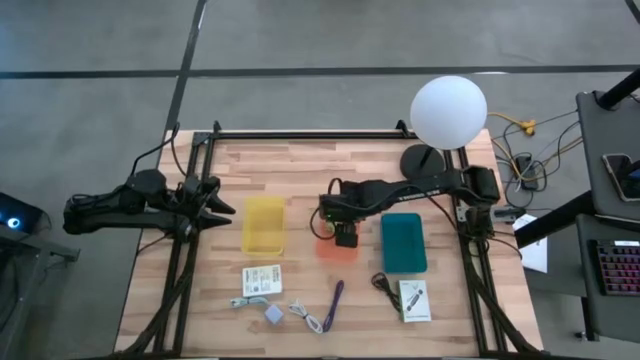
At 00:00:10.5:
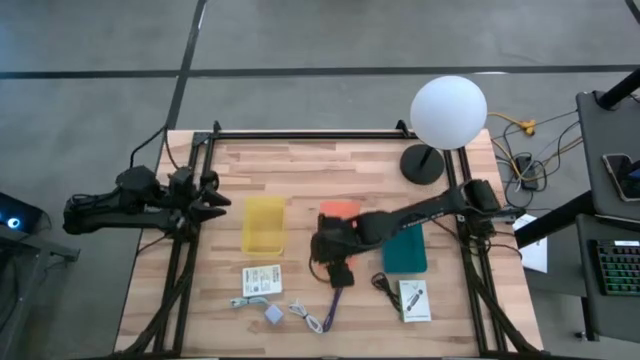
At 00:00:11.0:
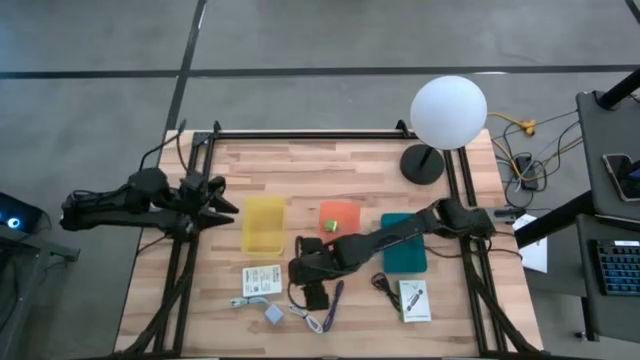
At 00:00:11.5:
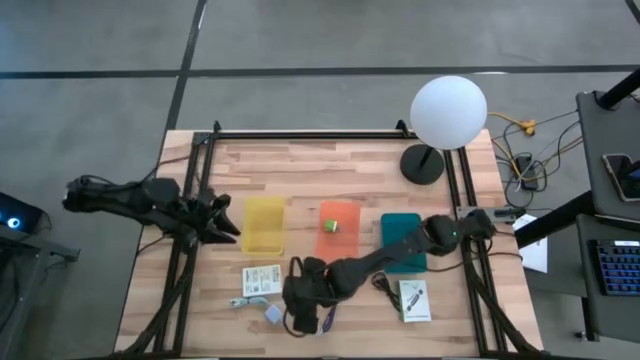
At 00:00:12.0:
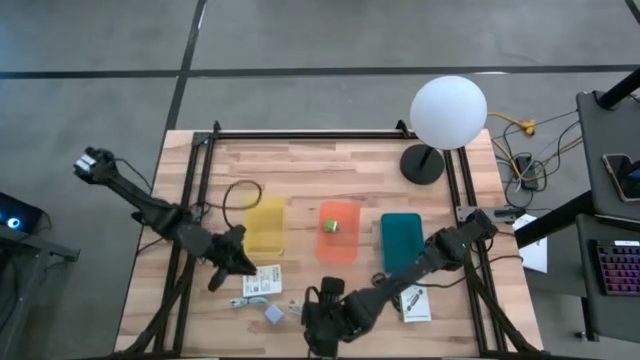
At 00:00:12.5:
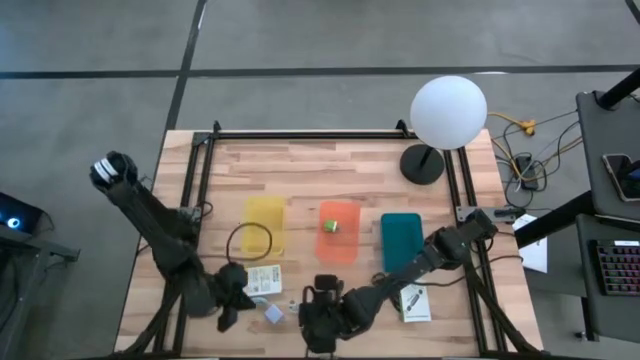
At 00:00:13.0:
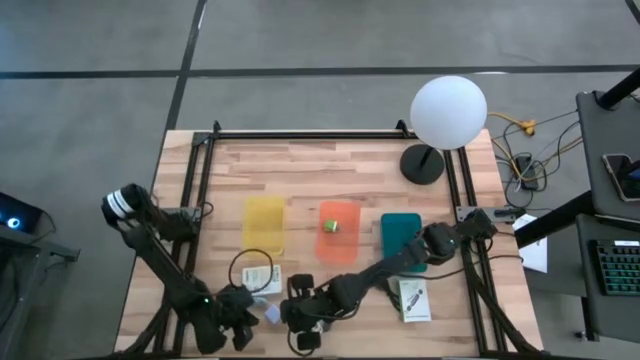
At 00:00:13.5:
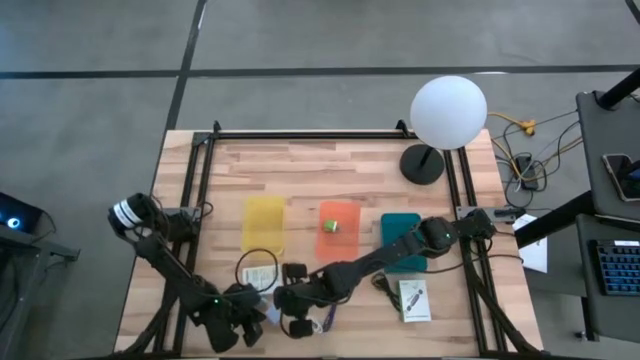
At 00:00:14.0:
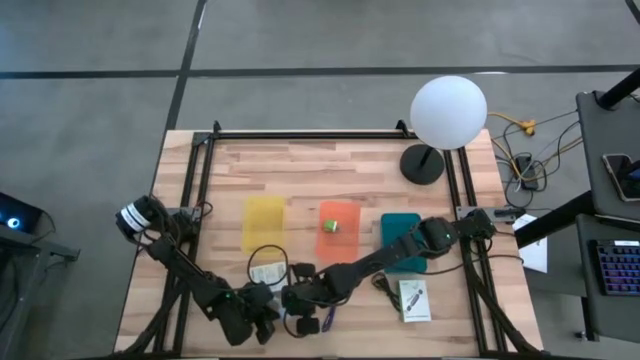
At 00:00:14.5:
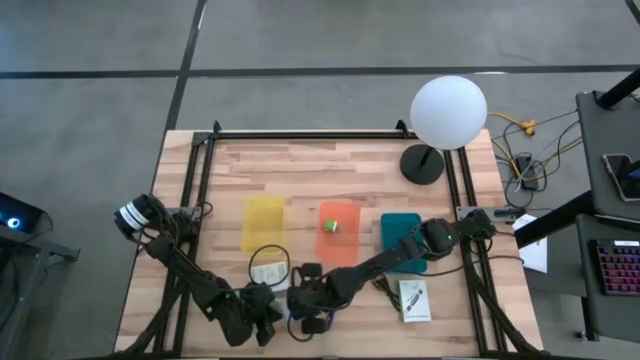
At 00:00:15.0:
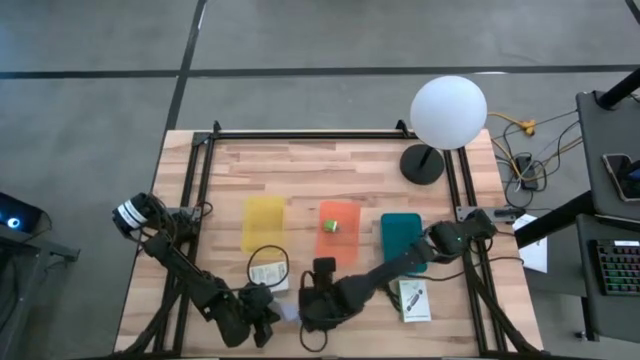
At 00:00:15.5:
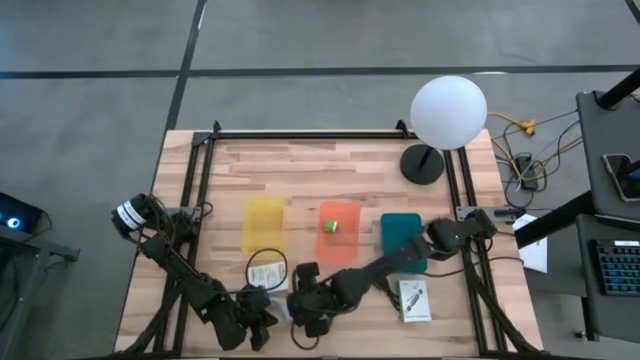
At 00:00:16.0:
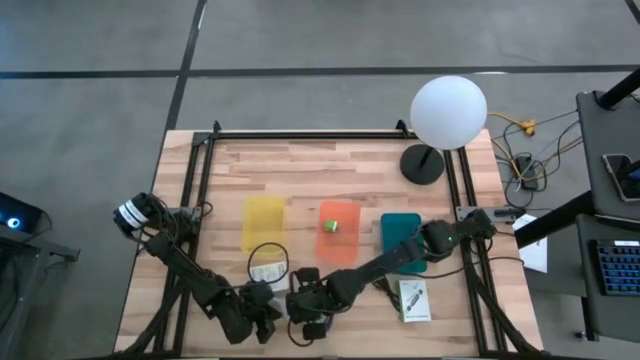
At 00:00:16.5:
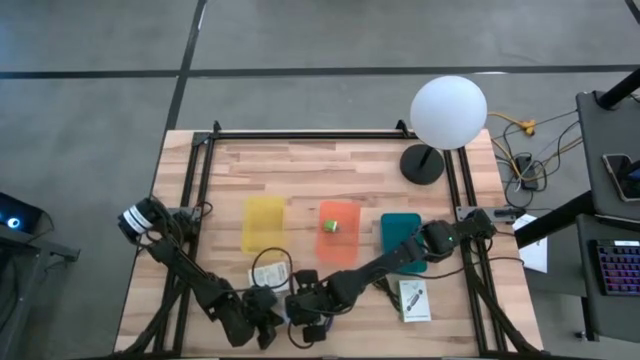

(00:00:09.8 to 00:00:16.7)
Task: Pick and place items into bin
Put the white charger adapter into the orange bin

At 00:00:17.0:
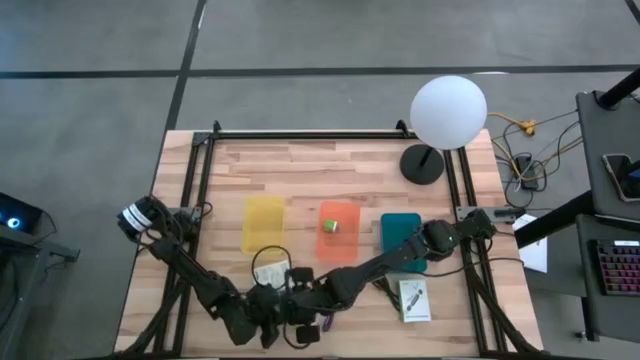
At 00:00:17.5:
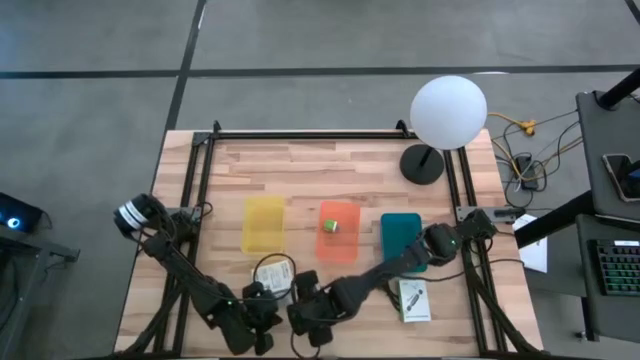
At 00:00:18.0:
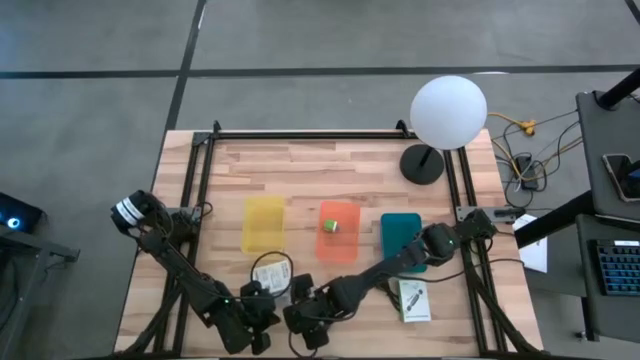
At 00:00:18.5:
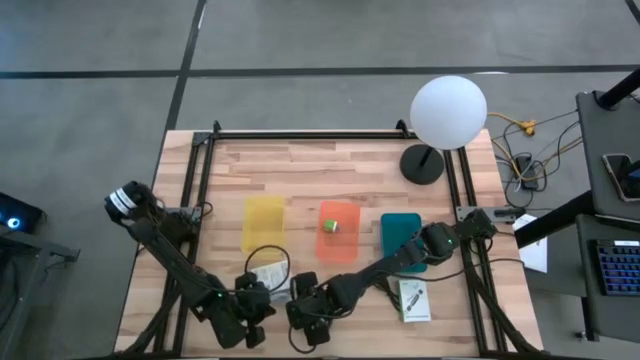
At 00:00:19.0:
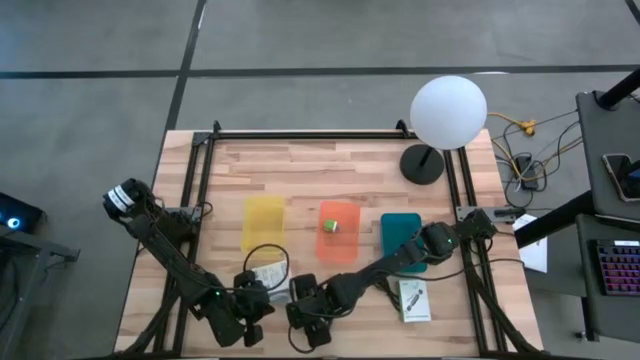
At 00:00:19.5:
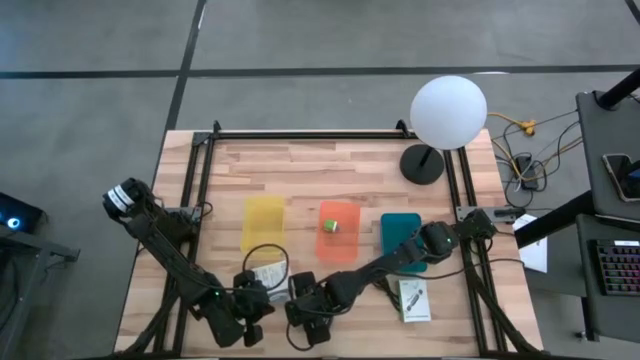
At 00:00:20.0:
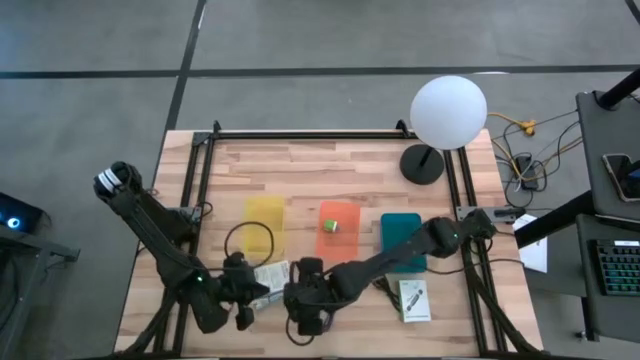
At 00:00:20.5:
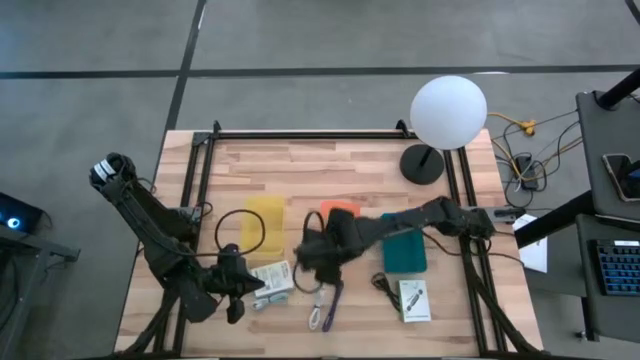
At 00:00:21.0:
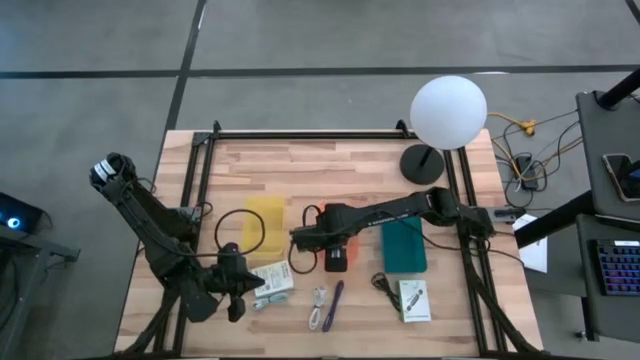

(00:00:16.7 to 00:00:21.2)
Put the white charger adapter into the orange bin

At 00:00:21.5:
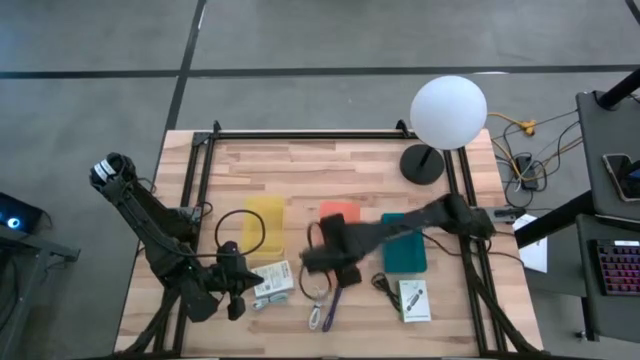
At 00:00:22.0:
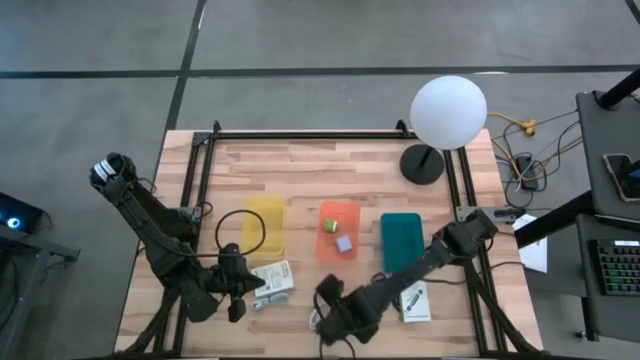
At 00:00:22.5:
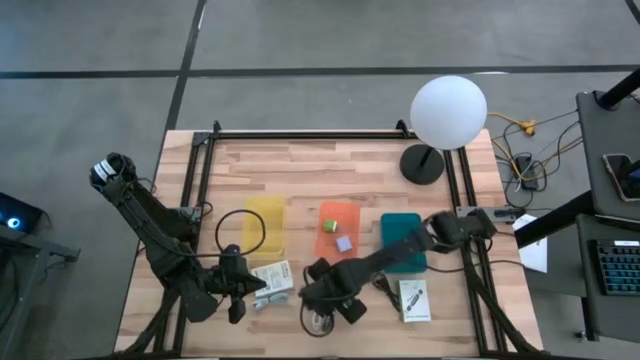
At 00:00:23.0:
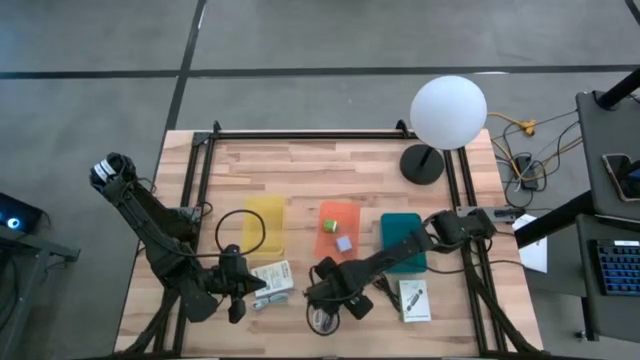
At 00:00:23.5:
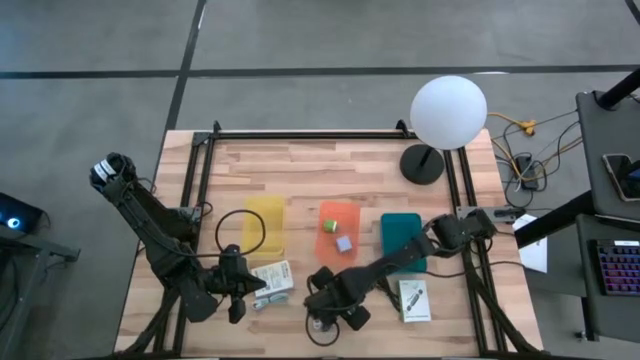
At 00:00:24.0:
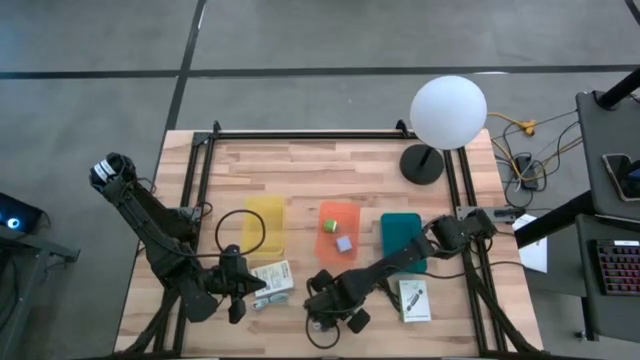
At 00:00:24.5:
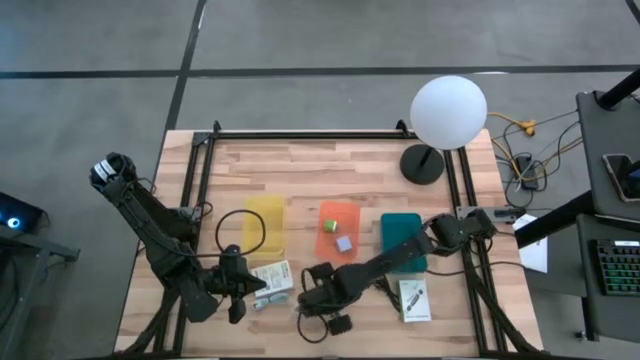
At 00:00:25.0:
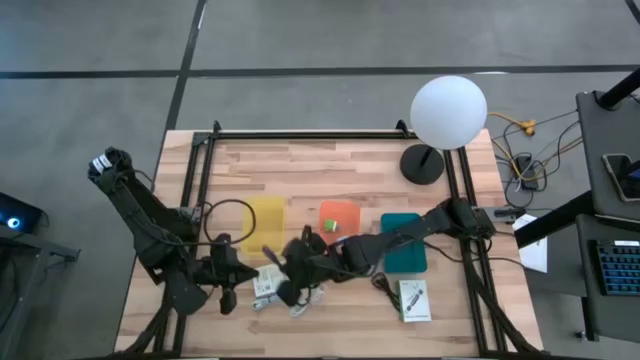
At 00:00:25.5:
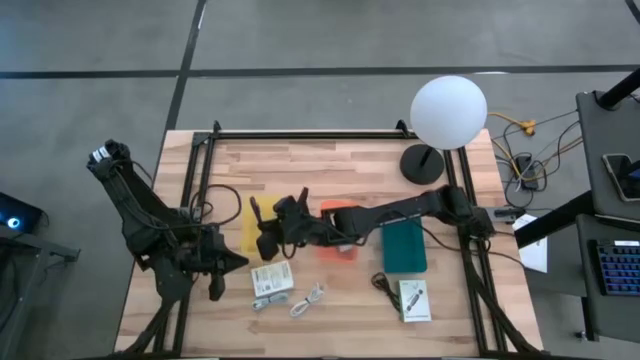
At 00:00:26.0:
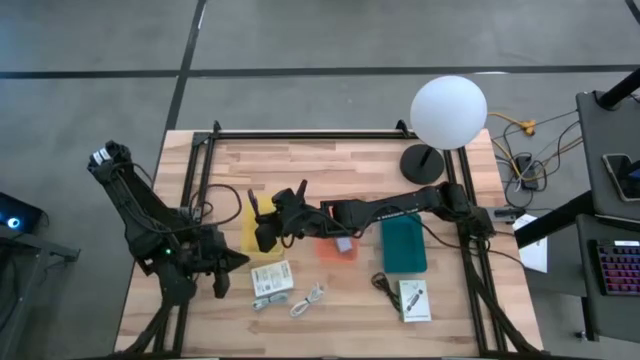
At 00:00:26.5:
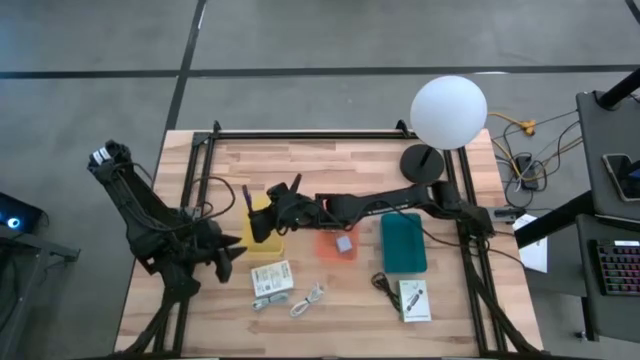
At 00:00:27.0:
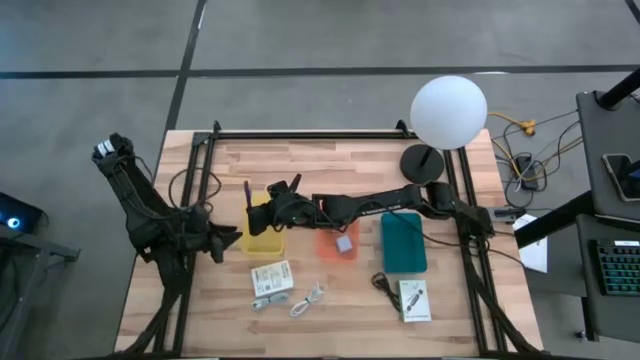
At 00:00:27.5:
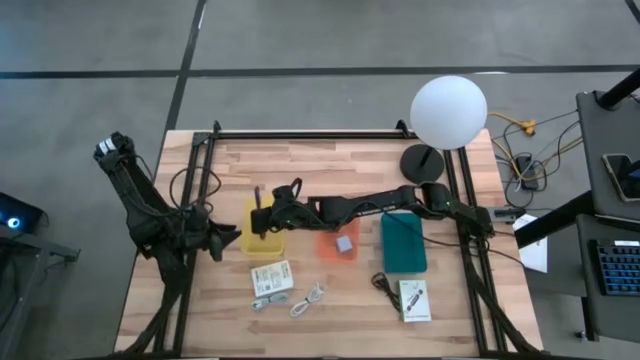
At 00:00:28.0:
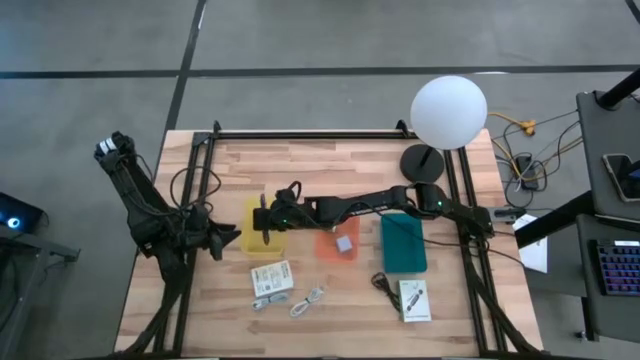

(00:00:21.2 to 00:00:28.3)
Put the purple charger cable into the yellow bin

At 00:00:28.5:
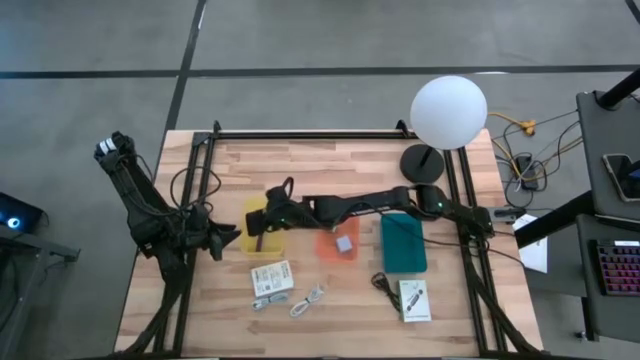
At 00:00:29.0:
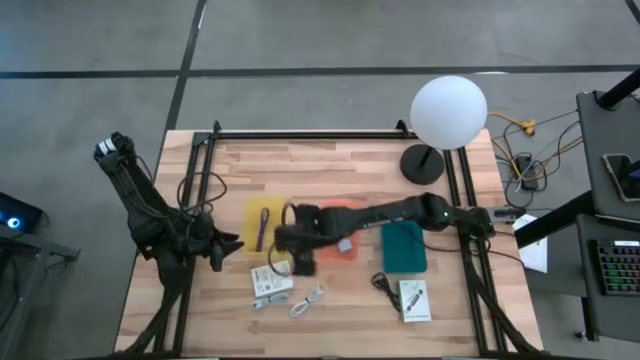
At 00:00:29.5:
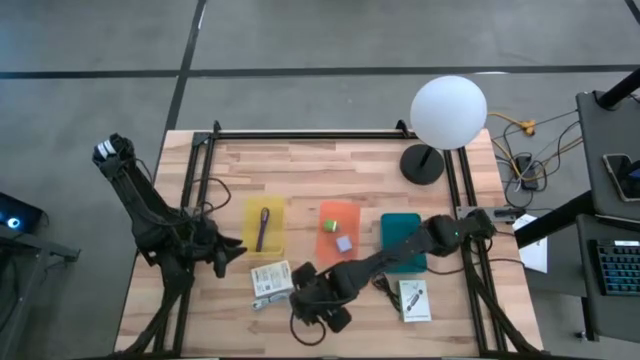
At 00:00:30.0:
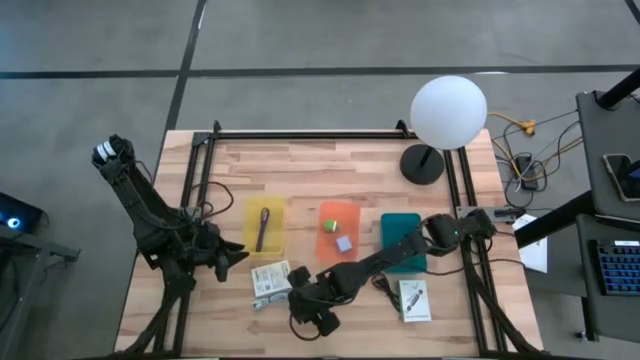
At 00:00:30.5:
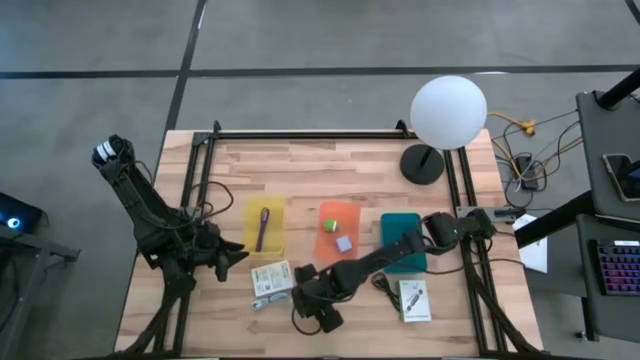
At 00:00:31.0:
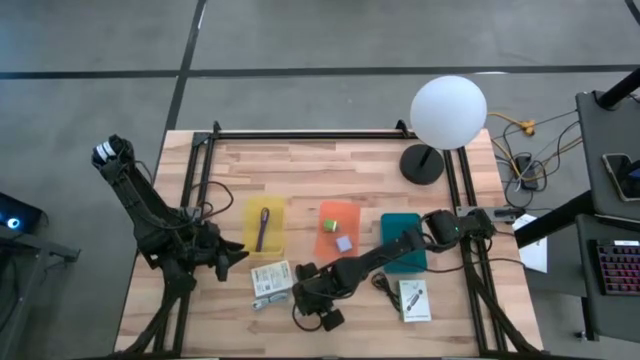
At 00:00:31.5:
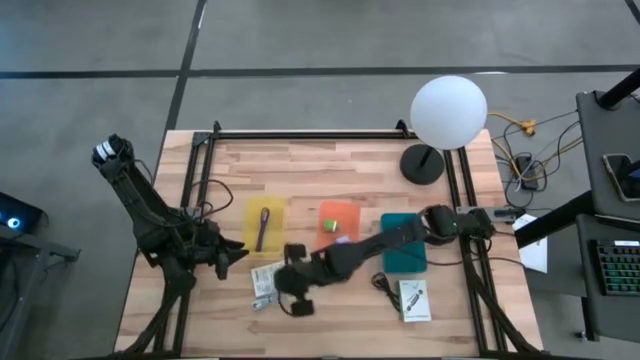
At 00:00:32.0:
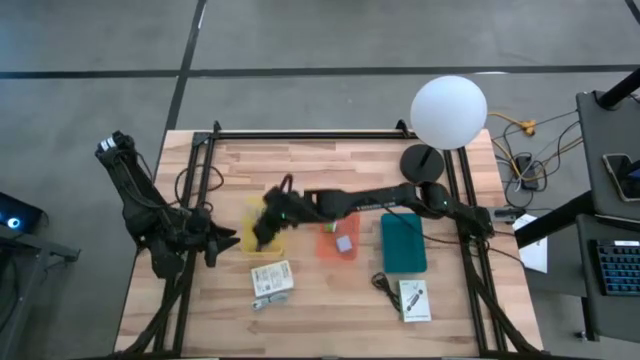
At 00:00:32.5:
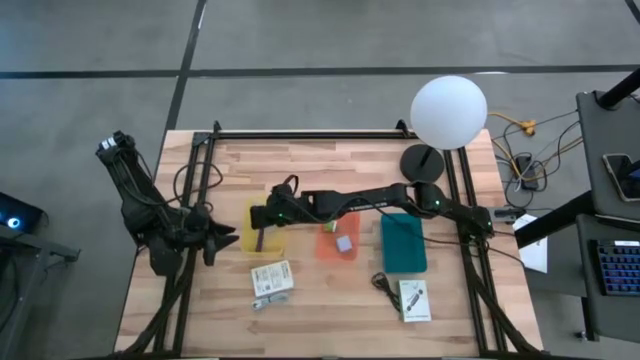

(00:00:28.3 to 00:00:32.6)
Put the white charger cable into the yellow bin
